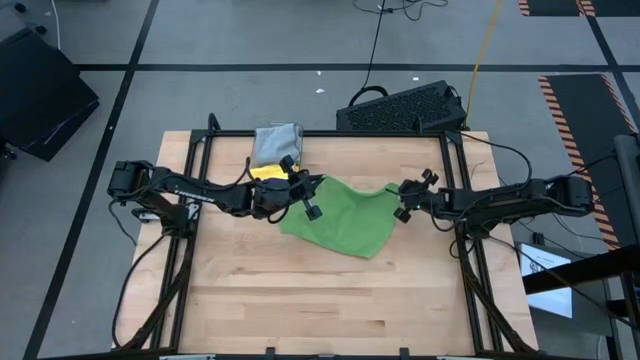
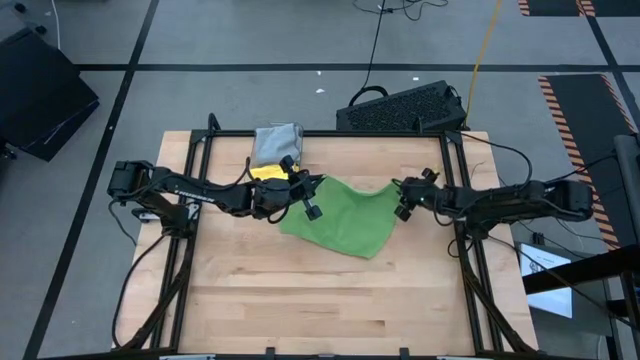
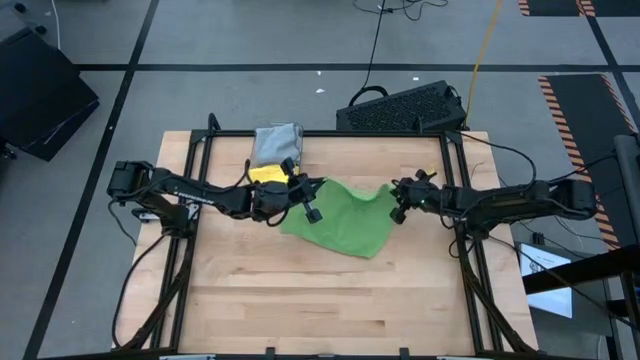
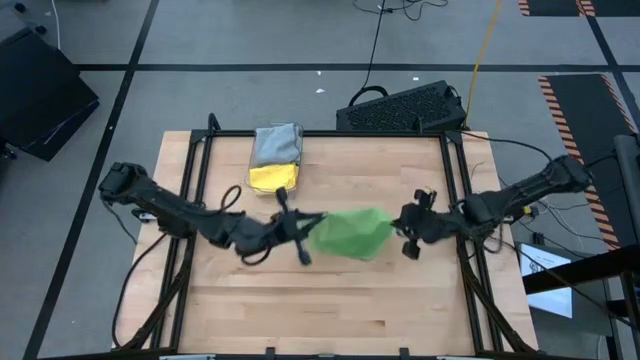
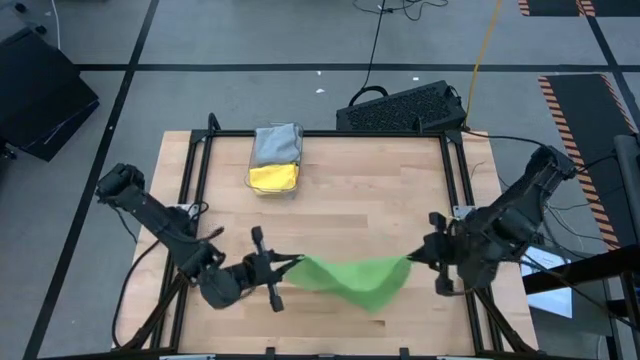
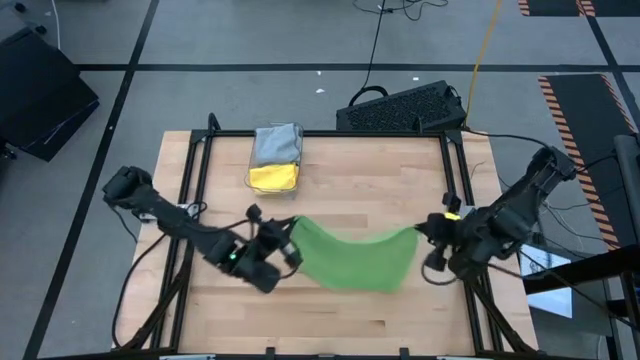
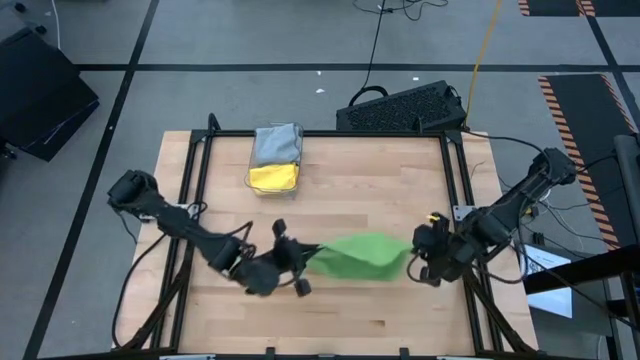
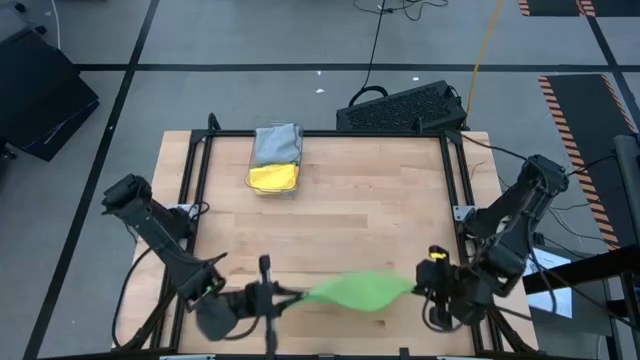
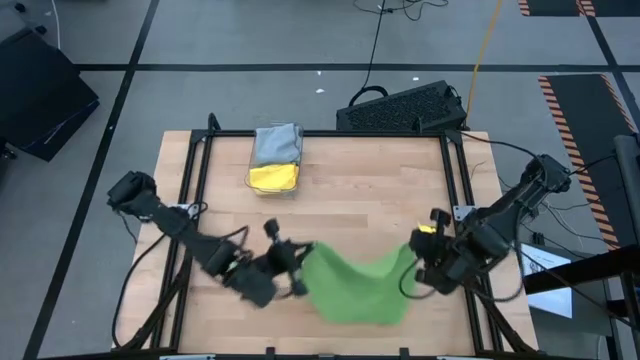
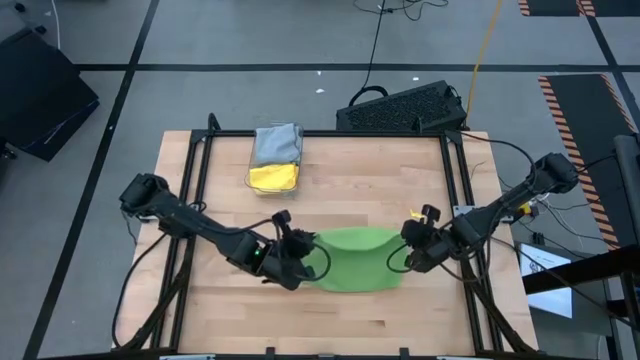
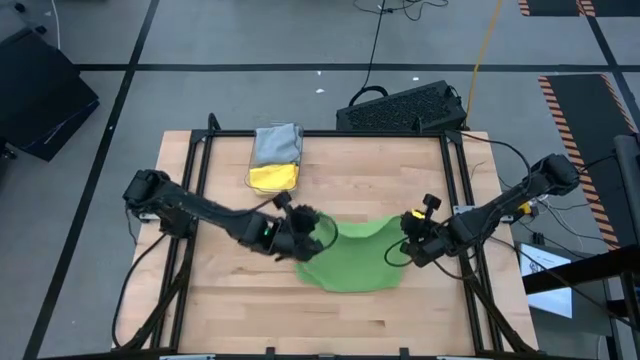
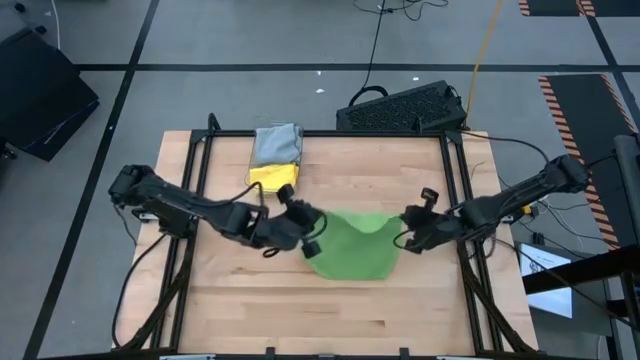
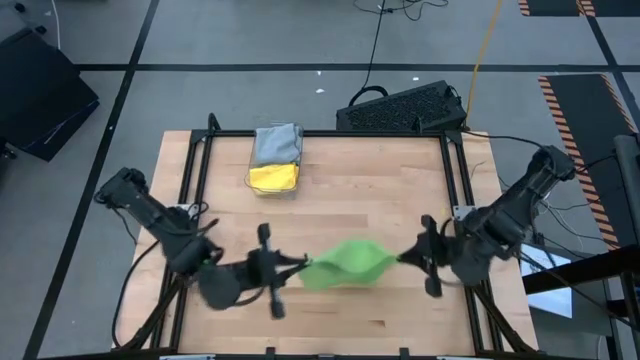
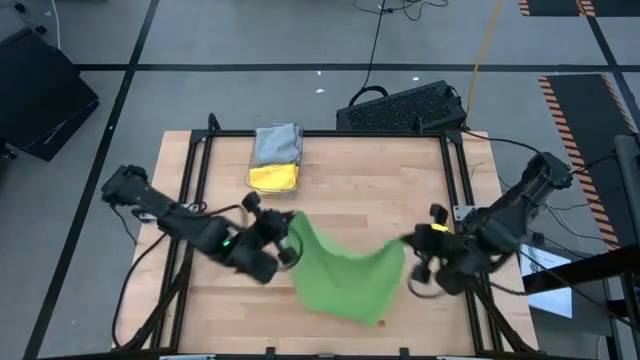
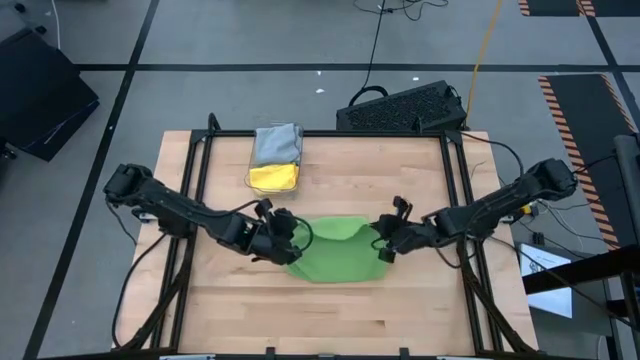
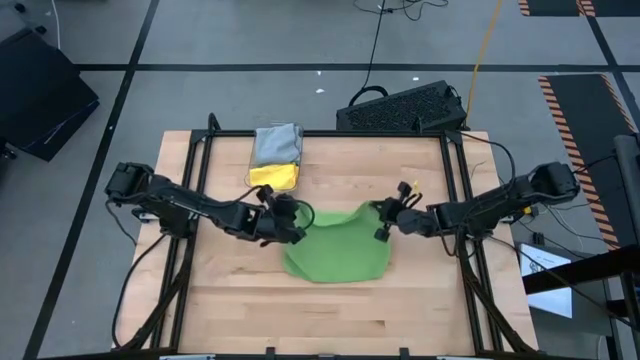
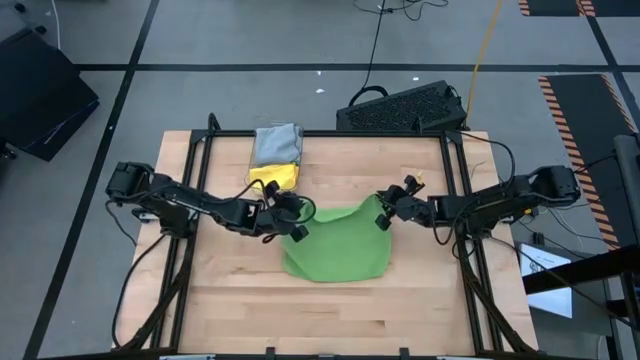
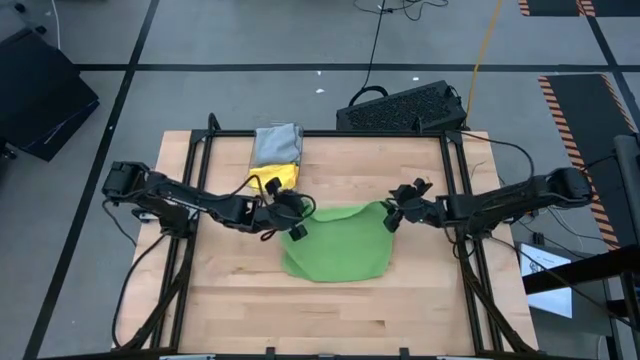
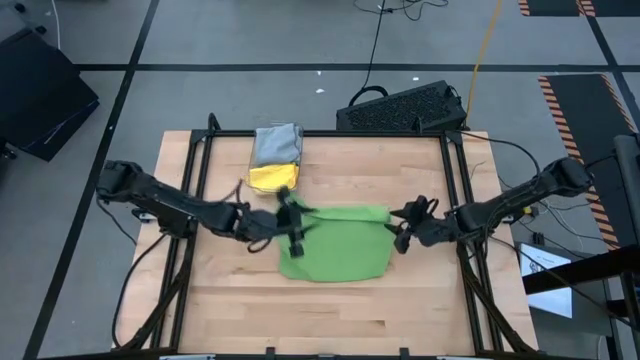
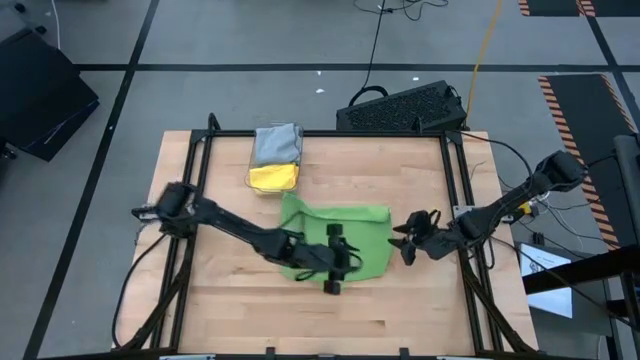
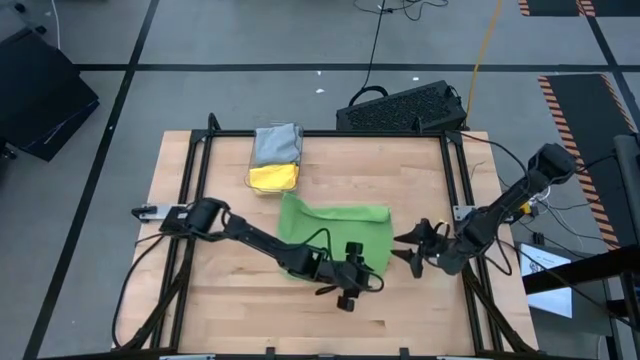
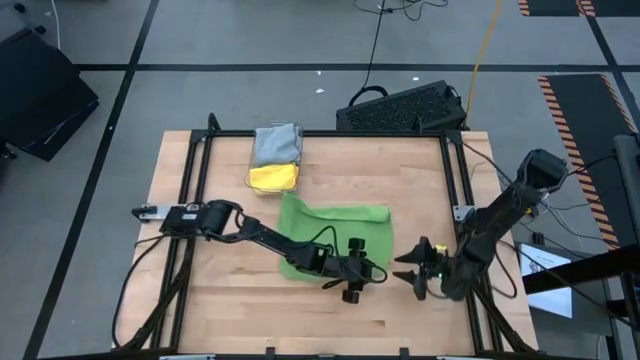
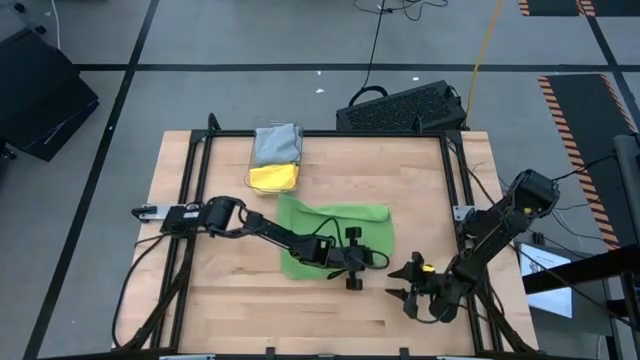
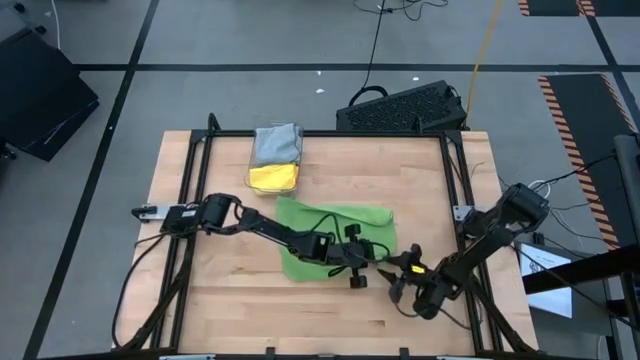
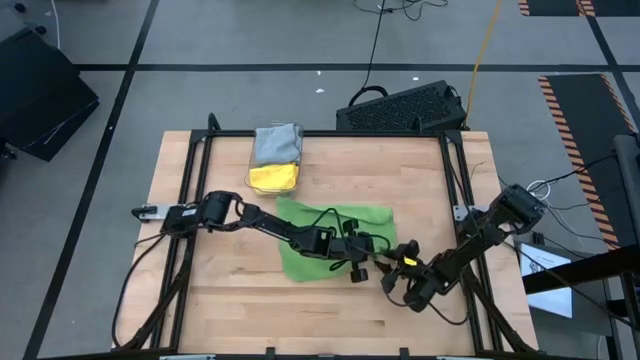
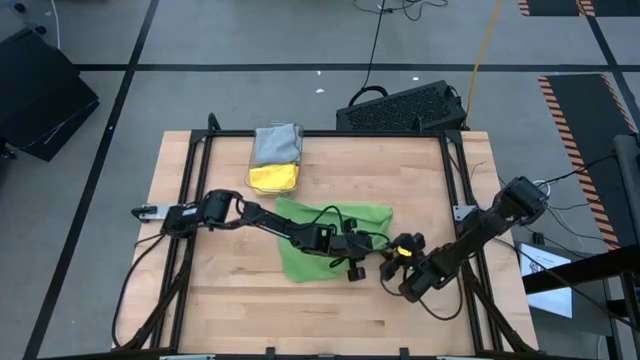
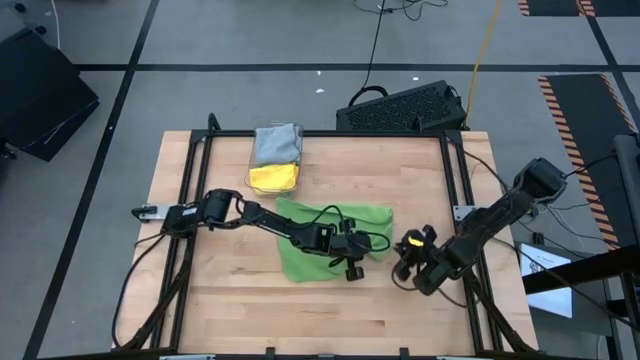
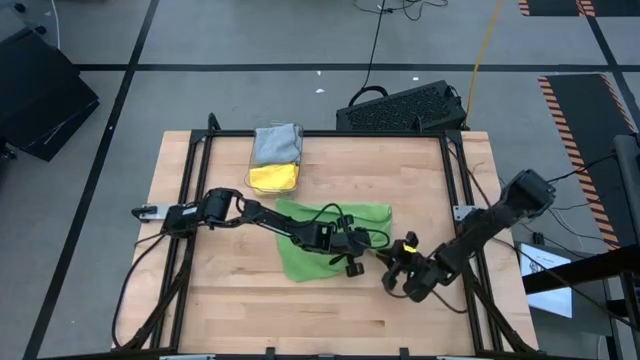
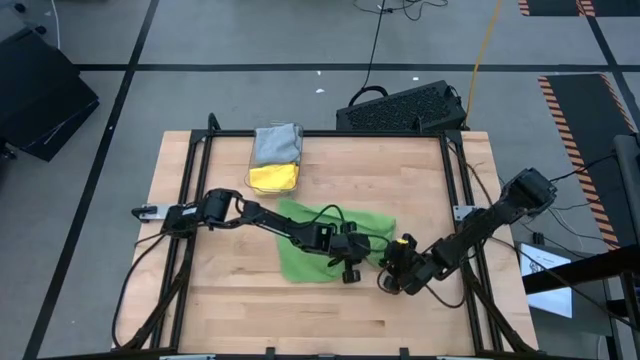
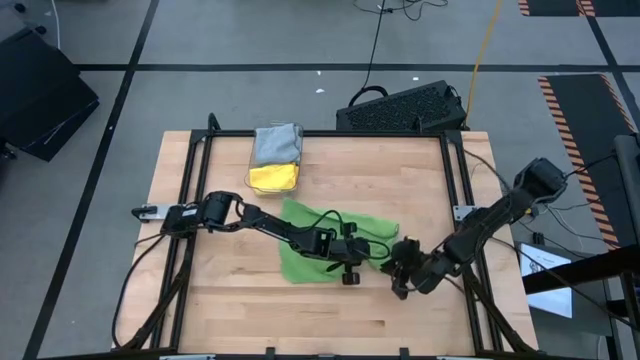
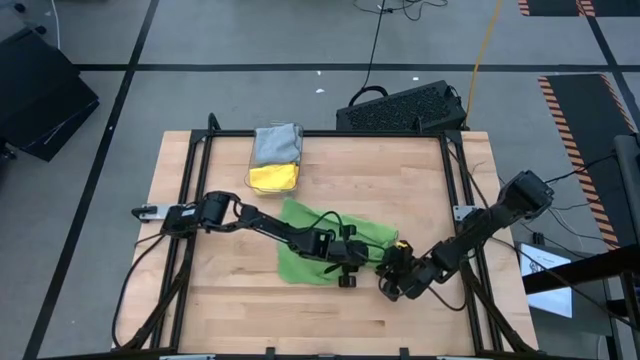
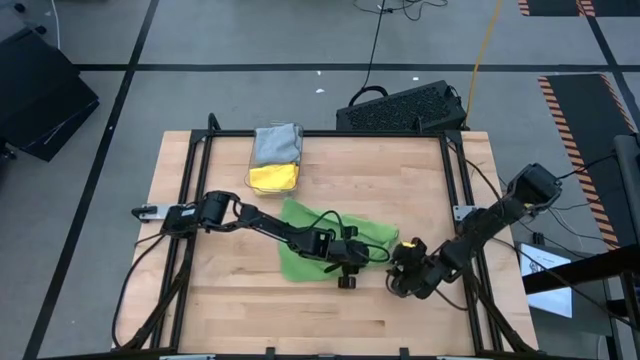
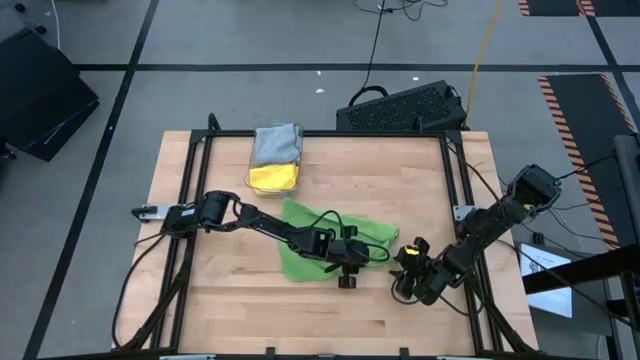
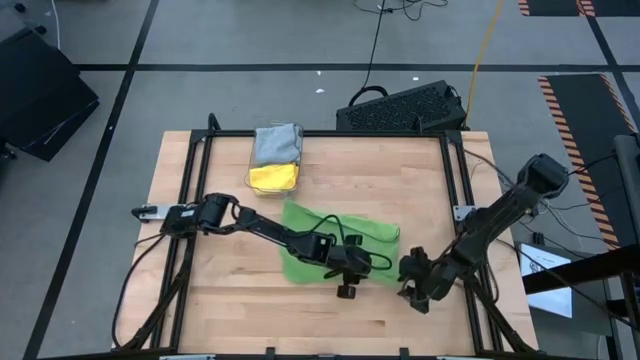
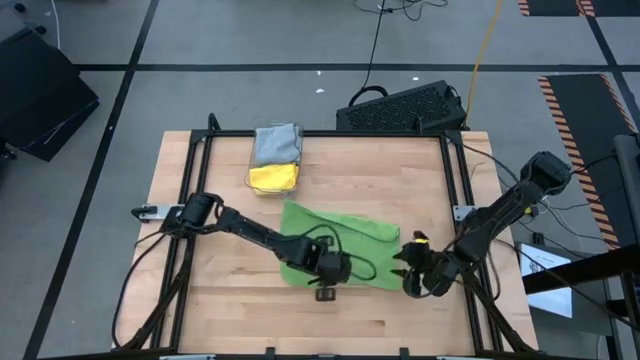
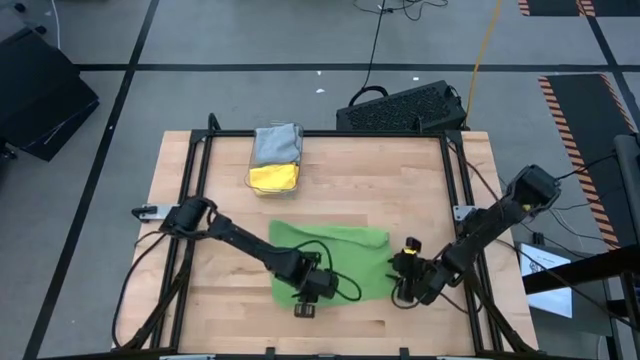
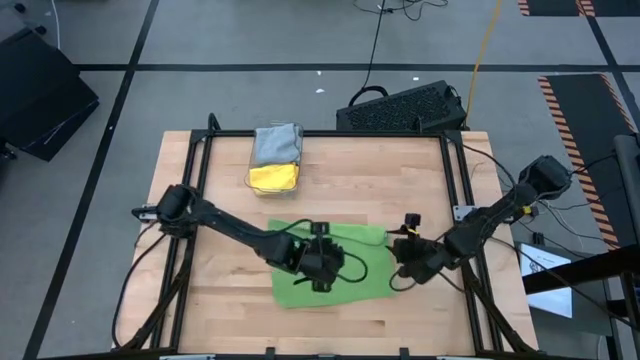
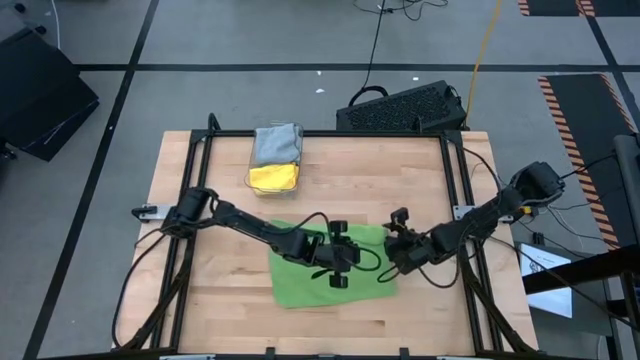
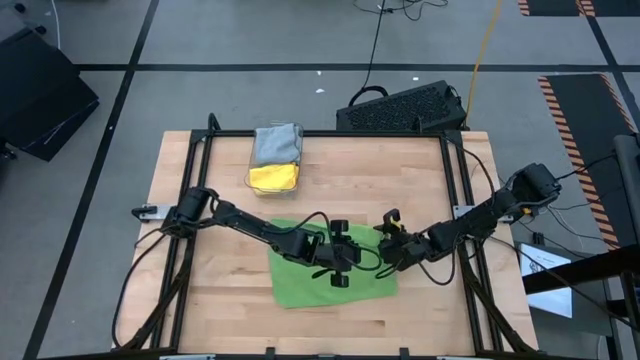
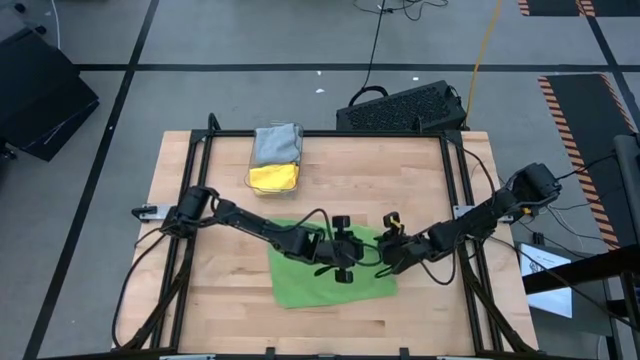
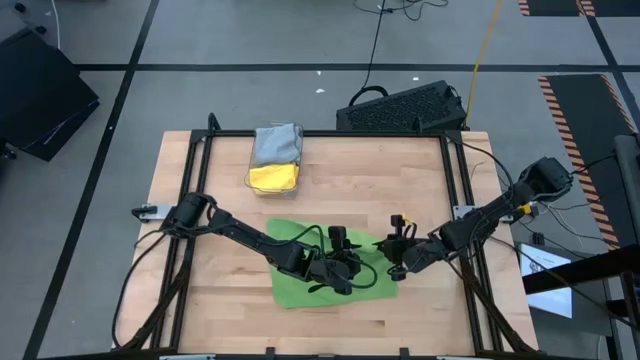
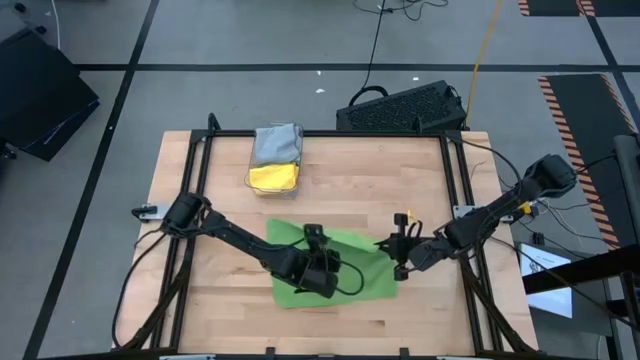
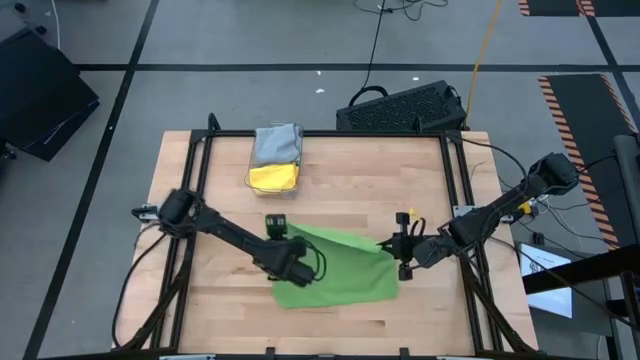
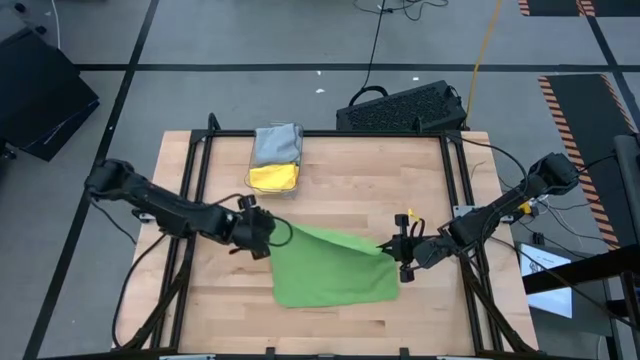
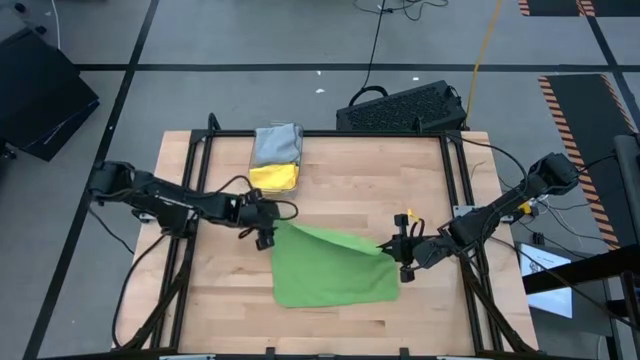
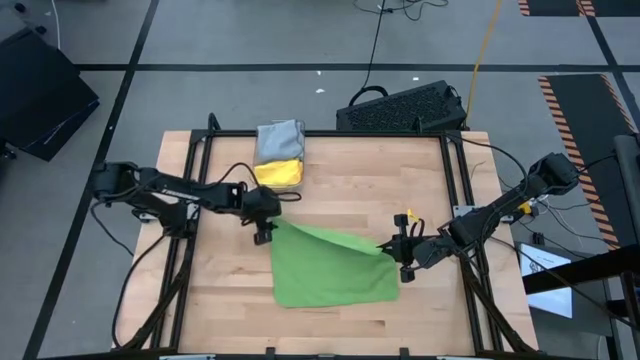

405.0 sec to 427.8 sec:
Task: Fold microfiber towels
Fold the green towel on the table
